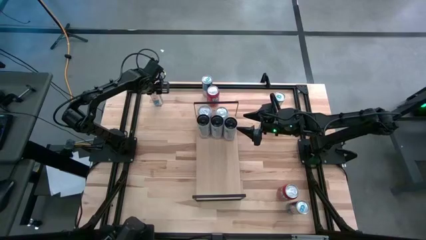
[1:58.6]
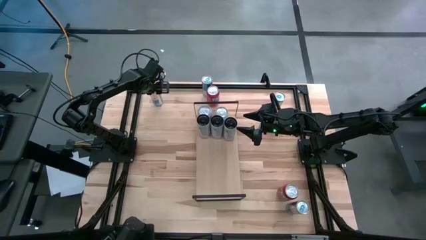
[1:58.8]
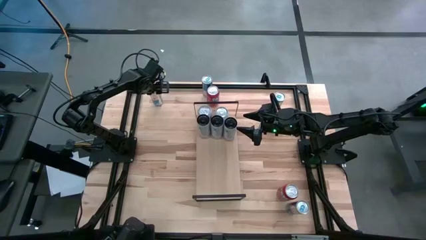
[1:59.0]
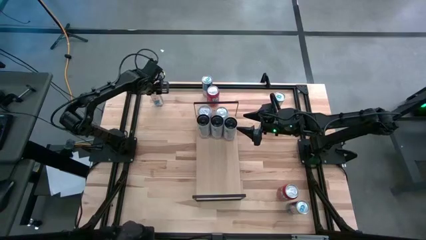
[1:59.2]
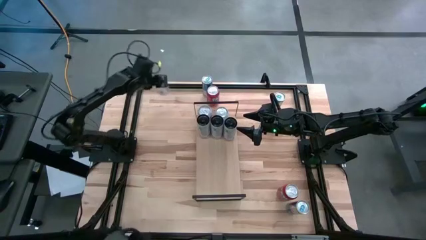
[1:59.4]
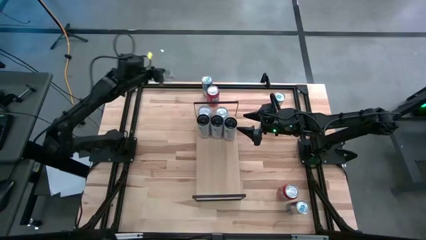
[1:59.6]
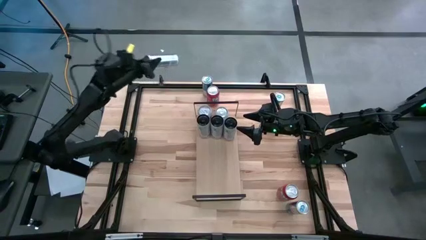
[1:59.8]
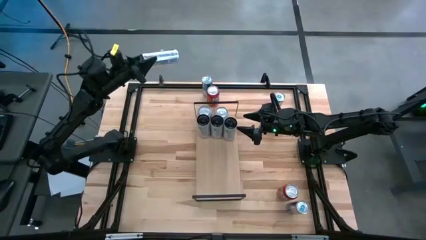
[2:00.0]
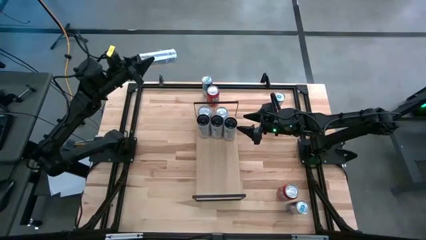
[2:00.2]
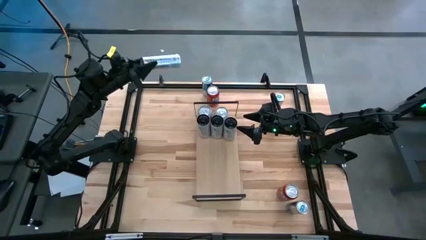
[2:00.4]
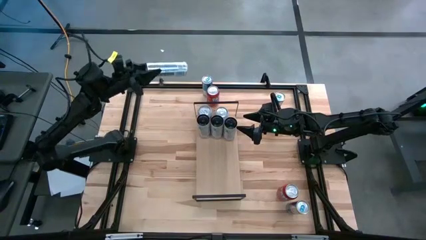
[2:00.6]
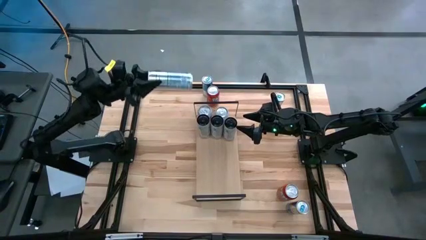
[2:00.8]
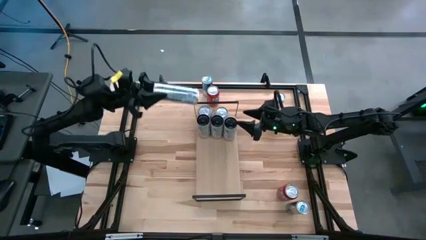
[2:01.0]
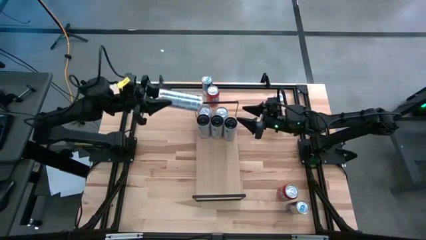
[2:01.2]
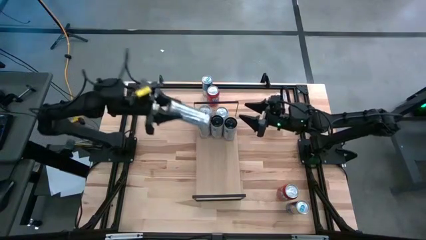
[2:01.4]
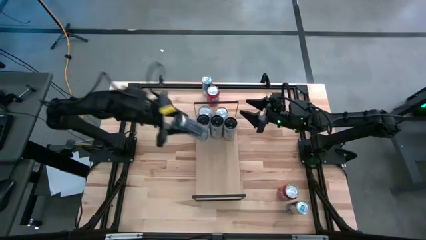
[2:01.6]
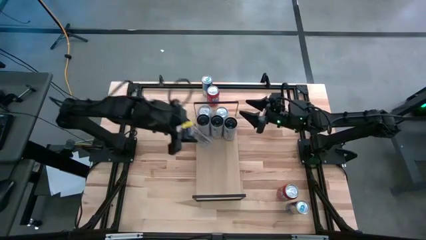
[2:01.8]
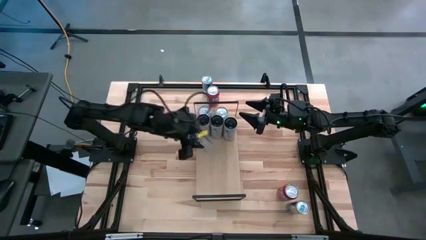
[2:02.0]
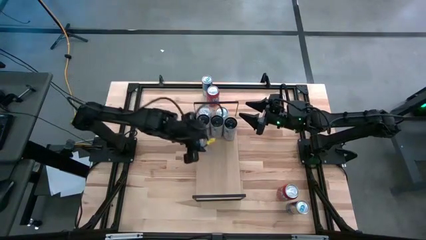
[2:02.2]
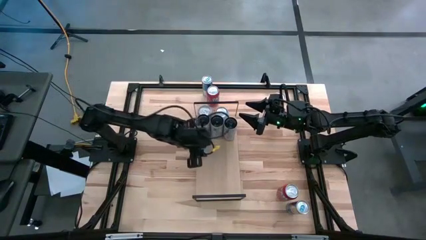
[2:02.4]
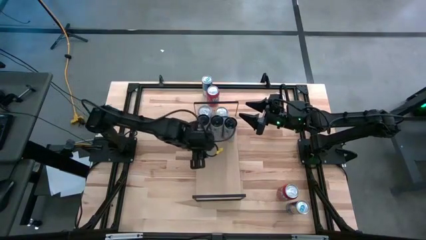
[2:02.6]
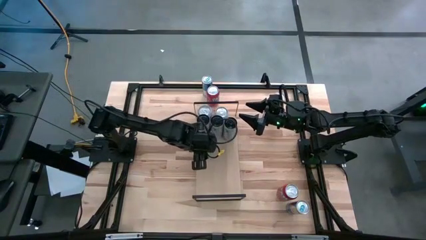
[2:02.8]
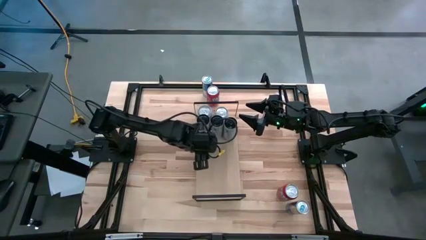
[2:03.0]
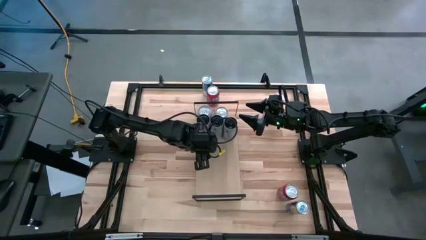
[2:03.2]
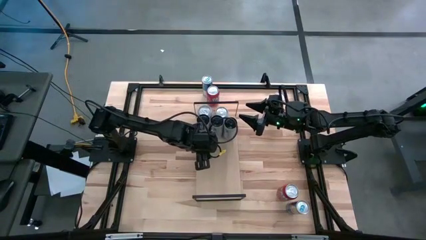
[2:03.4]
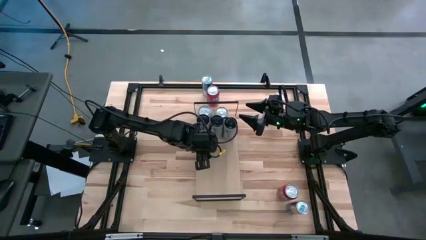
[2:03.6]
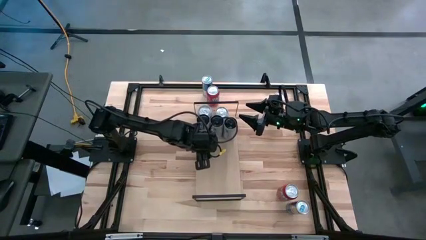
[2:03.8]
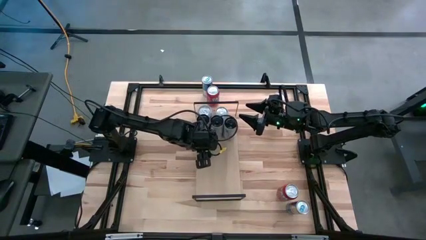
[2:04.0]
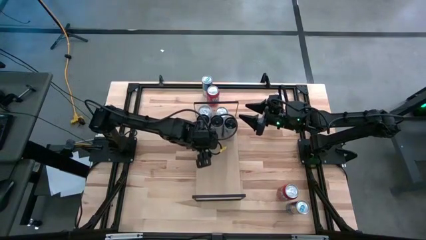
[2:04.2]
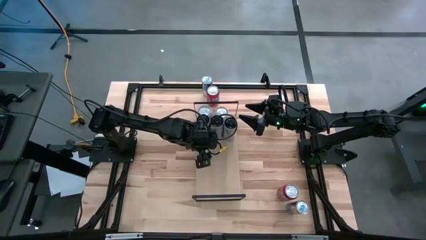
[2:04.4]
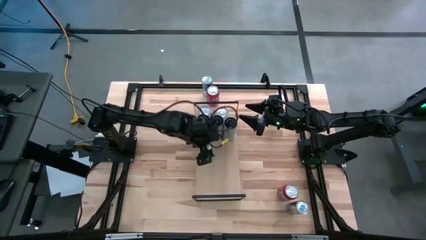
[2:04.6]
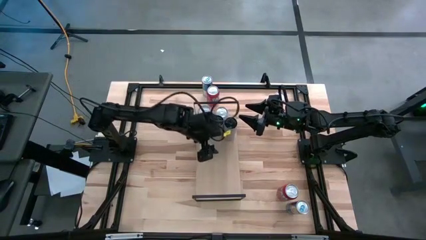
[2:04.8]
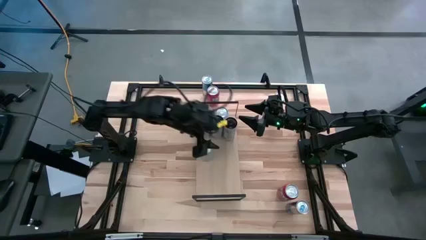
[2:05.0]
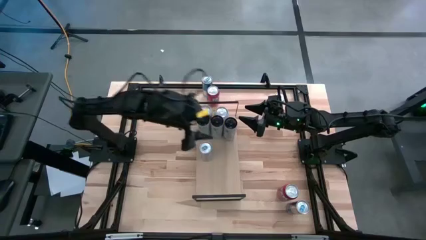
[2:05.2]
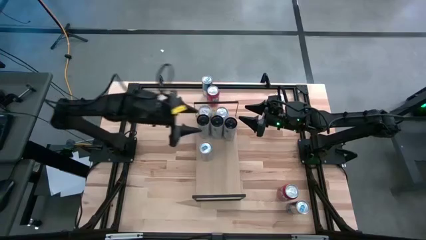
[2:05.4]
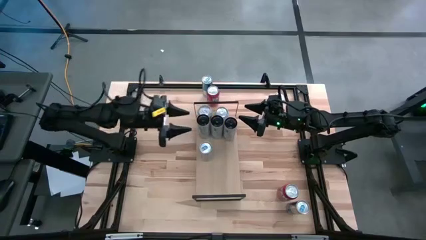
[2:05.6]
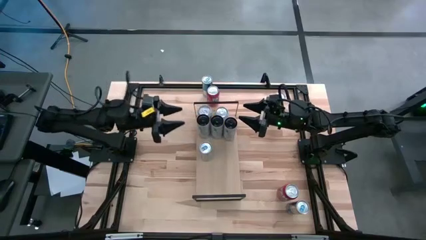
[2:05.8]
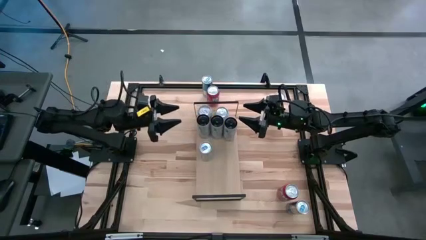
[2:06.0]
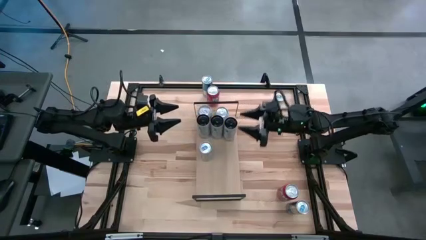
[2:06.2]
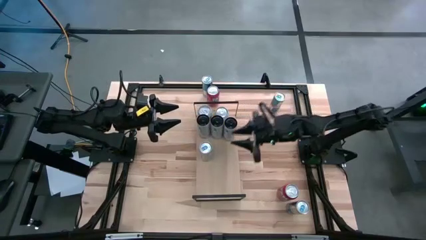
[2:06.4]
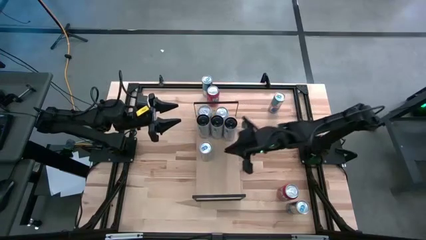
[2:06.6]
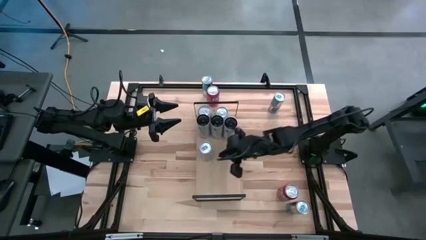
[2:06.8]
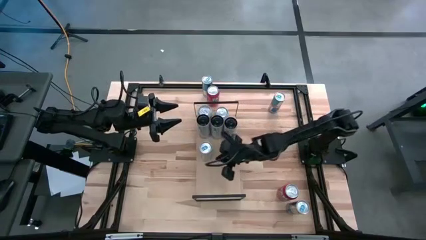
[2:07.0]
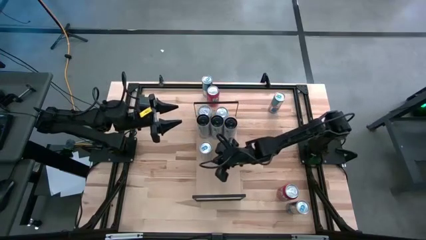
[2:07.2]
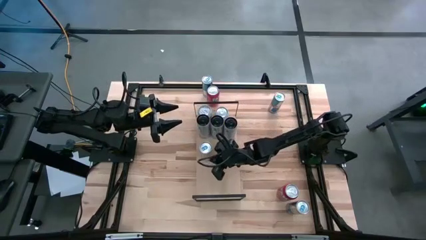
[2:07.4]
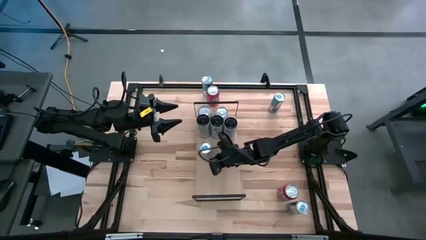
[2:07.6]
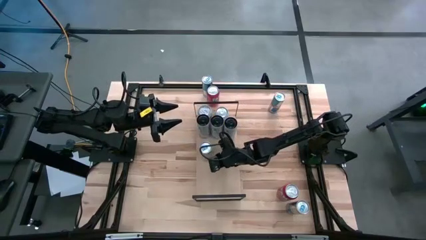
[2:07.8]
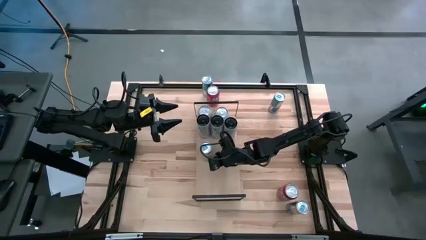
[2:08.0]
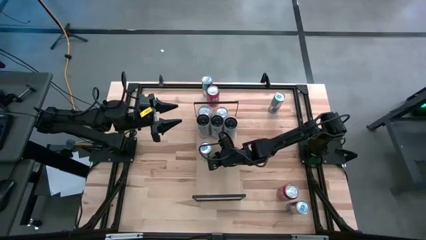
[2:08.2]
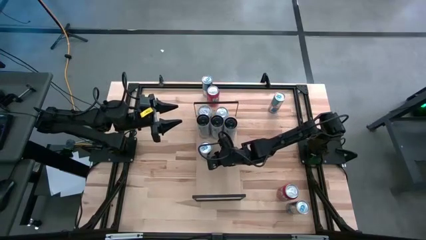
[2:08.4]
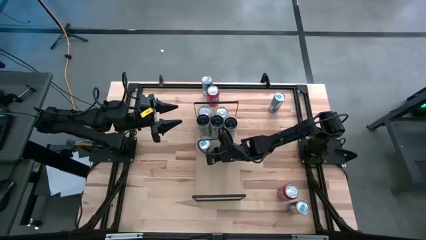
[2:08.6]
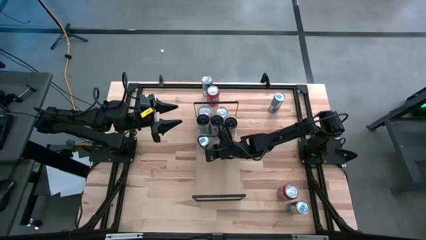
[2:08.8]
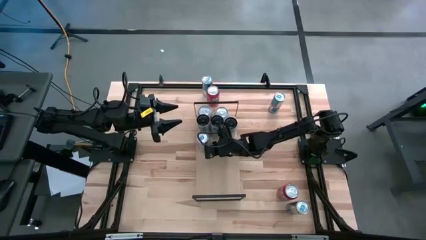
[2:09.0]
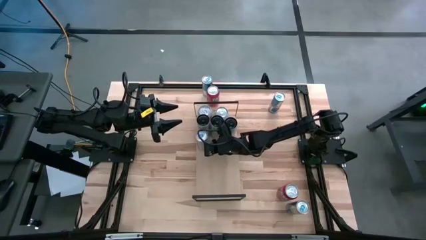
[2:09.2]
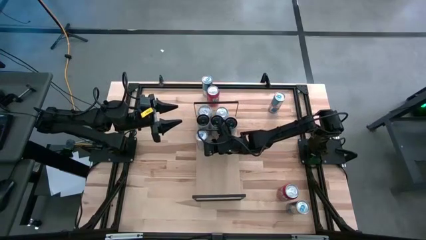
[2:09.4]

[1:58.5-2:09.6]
Task: Place canned beverage on shelf
Put the left blue soda can on the shelf

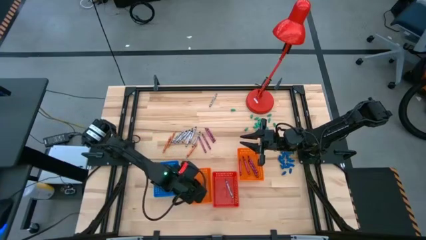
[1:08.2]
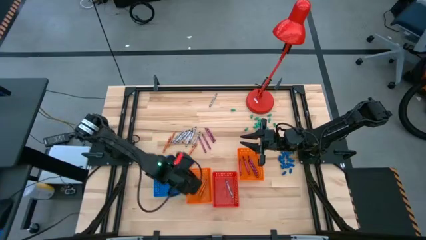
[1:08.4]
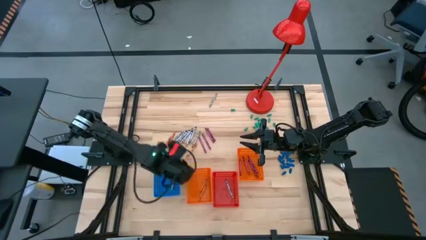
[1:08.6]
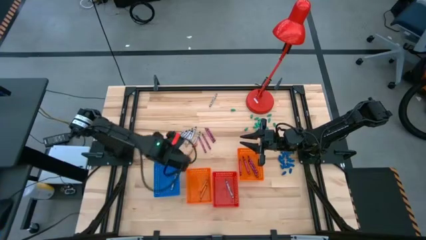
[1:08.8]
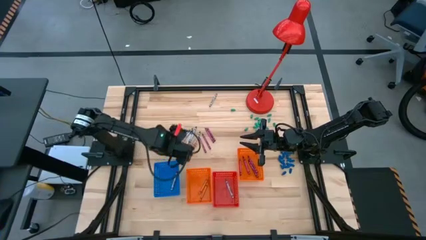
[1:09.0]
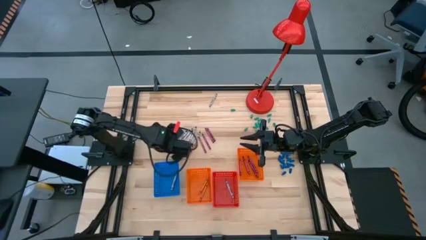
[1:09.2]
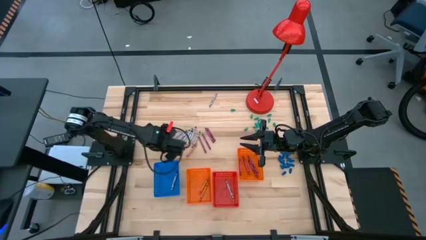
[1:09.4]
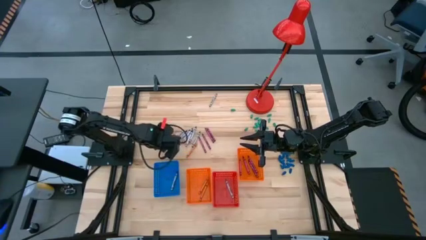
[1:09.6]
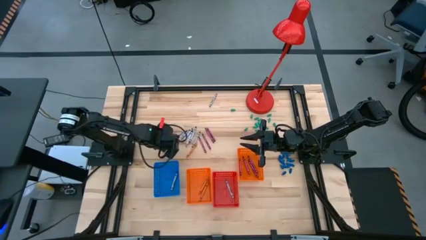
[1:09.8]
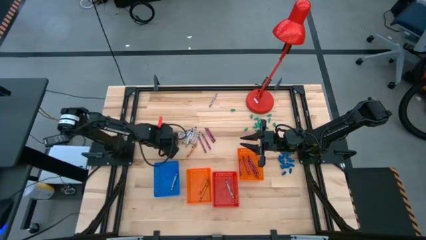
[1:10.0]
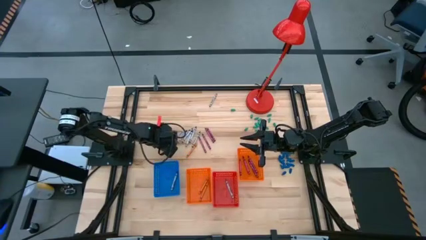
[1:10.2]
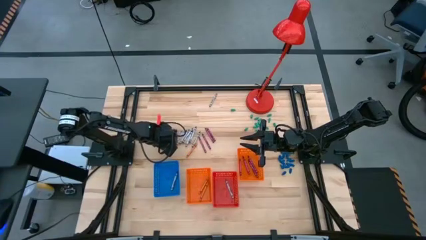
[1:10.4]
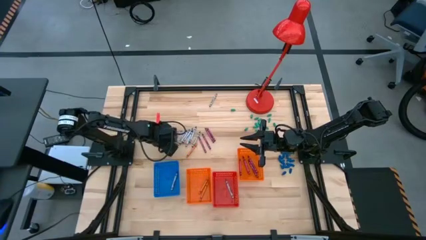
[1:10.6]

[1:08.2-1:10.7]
Task: Sort crayons
Put the orange crayon into the left orange bin

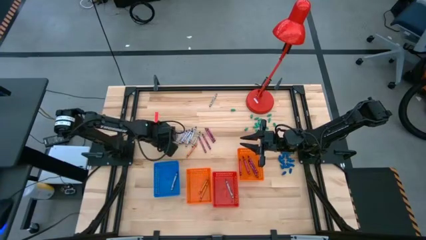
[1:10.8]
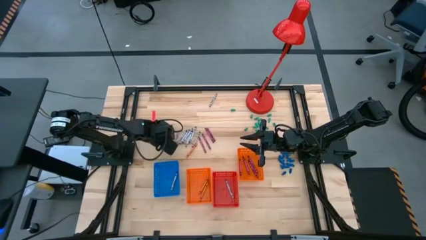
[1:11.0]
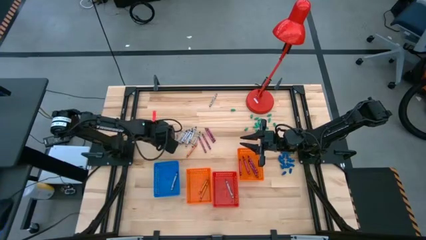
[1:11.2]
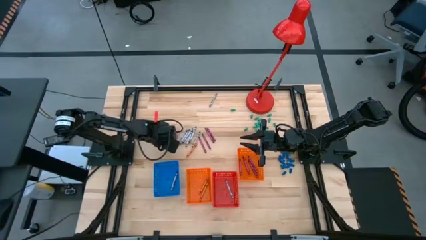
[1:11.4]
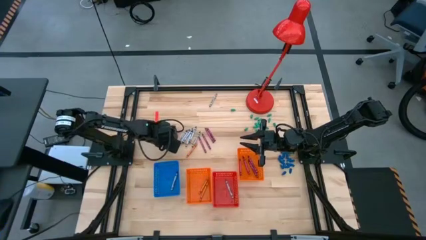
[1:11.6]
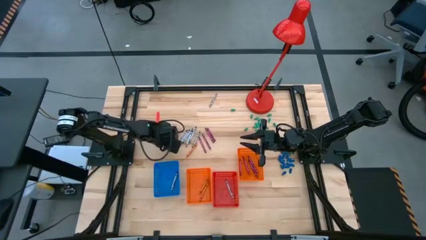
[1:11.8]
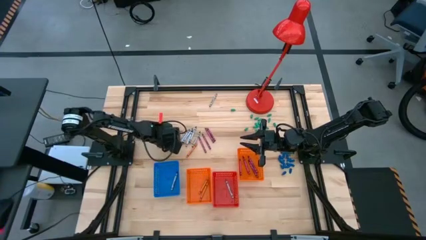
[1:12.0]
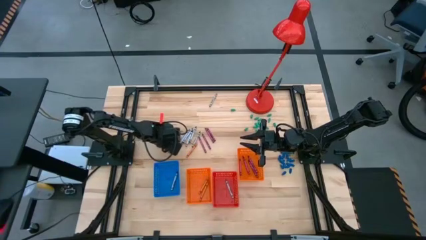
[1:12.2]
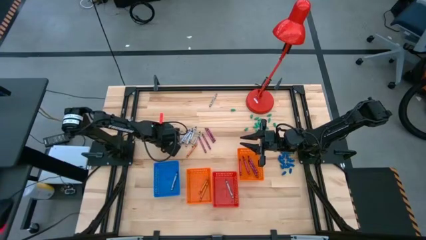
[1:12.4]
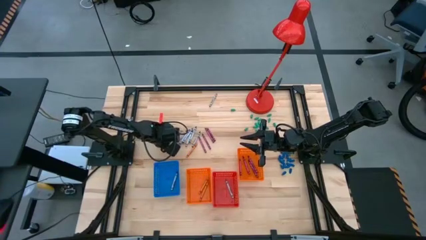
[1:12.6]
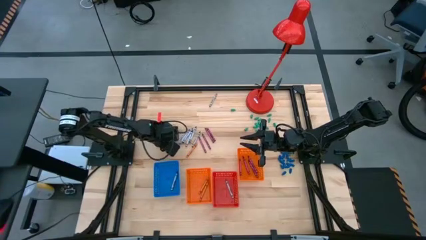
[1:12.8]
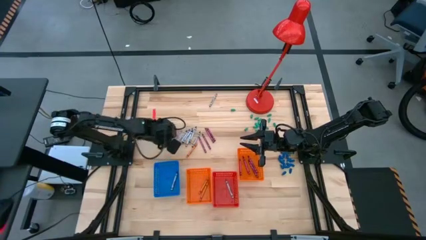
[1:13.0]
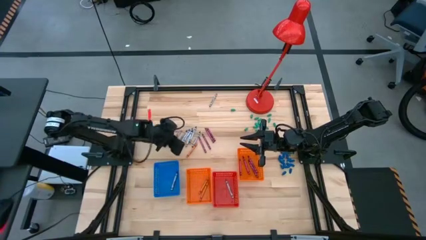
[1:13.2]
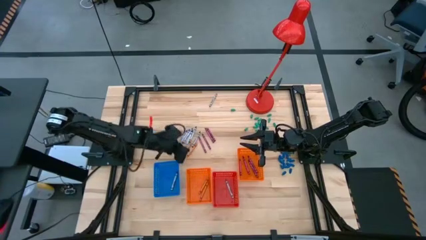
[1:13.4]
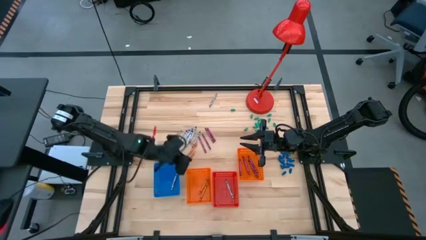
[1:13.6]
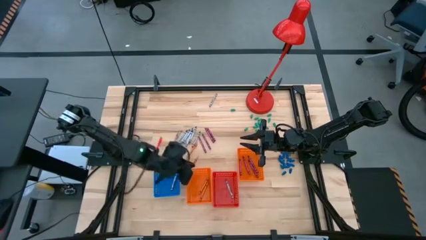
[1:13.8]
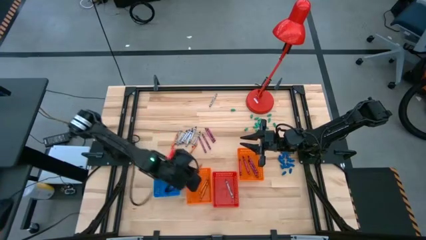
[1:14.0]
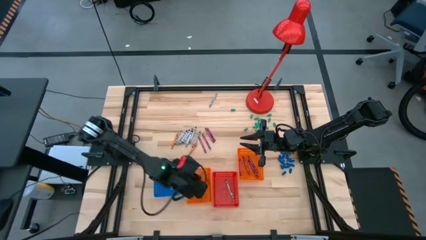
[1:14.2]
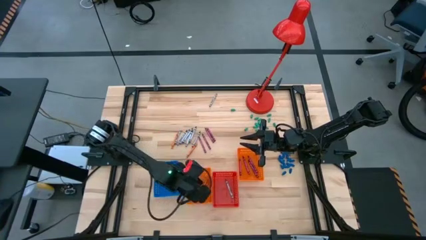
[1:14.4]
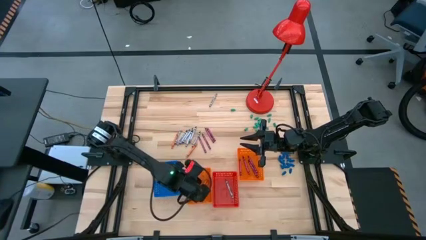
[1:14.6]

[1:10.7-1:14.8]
Put the orange crayon into the left orange bin
